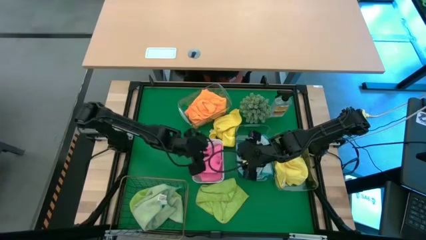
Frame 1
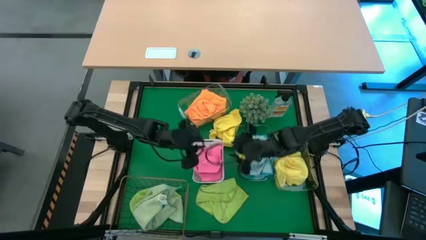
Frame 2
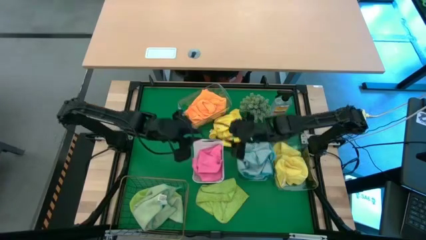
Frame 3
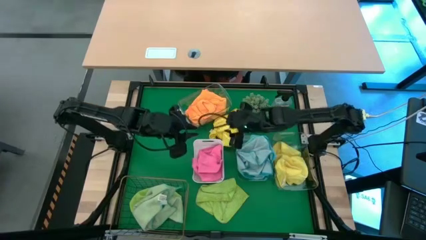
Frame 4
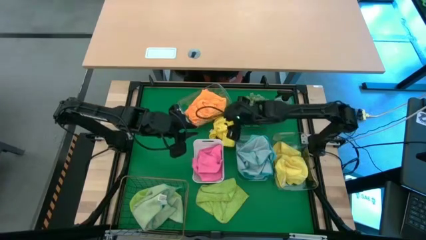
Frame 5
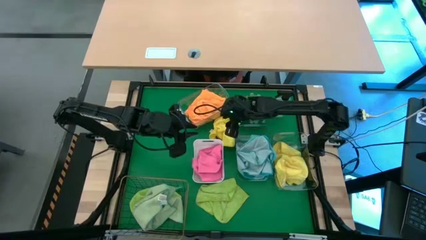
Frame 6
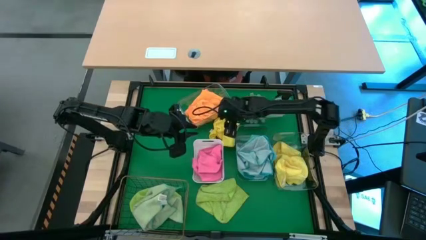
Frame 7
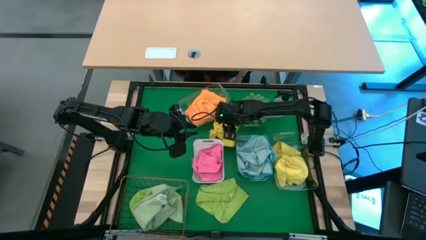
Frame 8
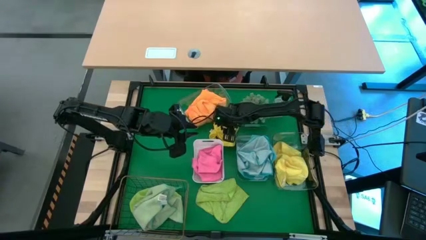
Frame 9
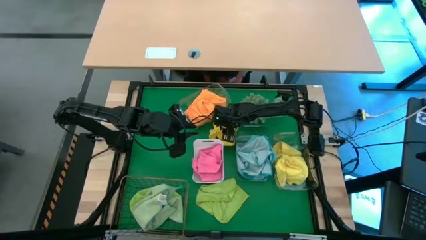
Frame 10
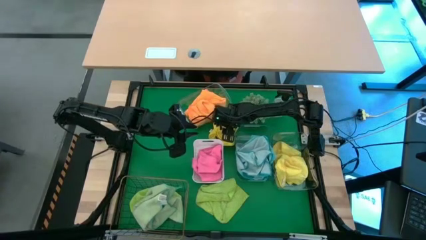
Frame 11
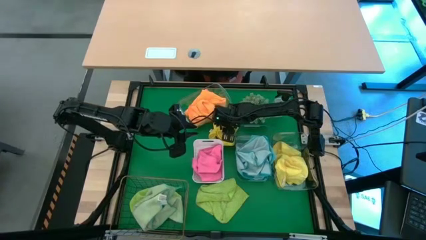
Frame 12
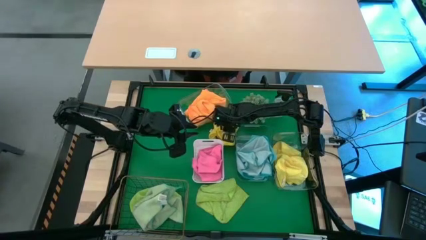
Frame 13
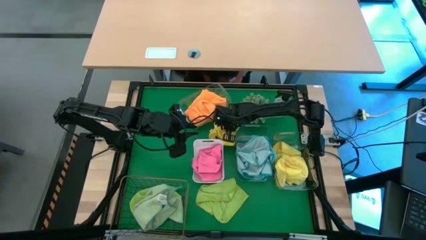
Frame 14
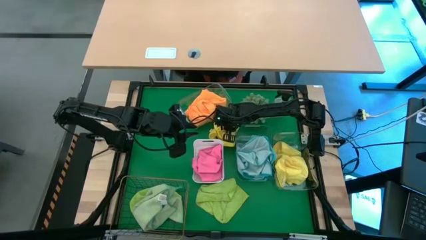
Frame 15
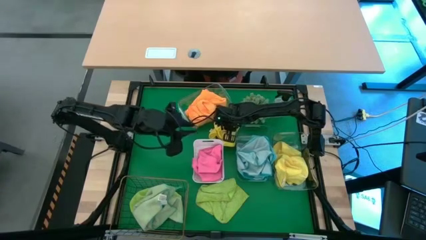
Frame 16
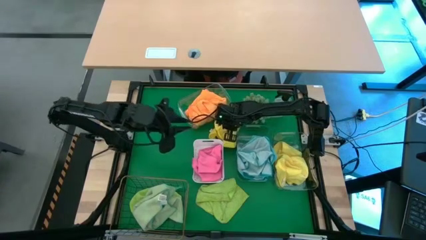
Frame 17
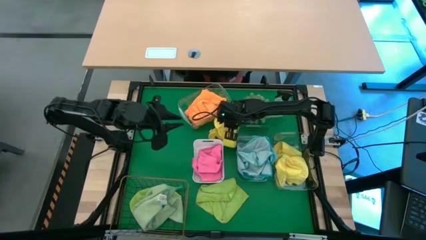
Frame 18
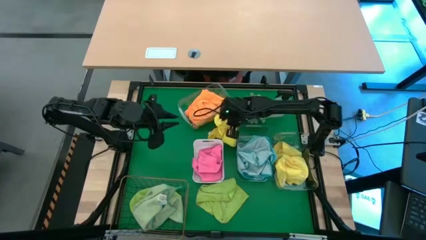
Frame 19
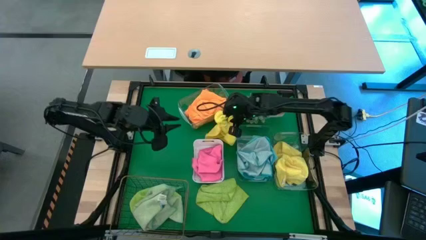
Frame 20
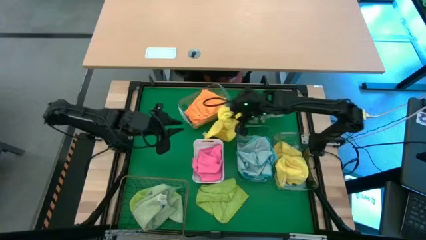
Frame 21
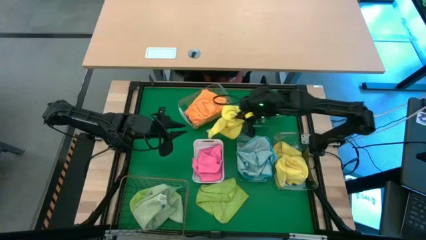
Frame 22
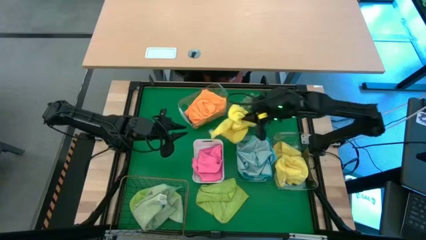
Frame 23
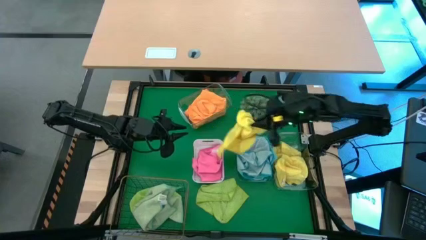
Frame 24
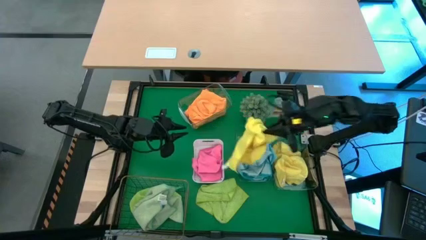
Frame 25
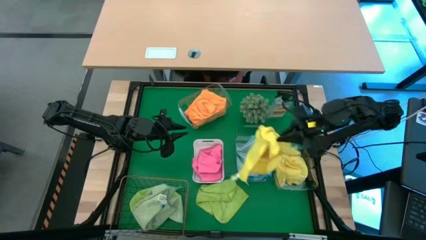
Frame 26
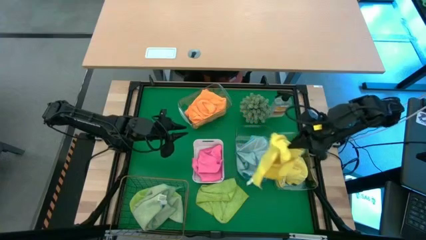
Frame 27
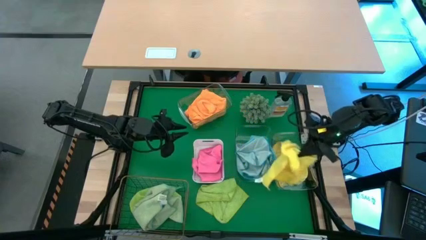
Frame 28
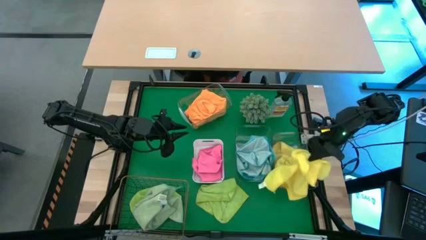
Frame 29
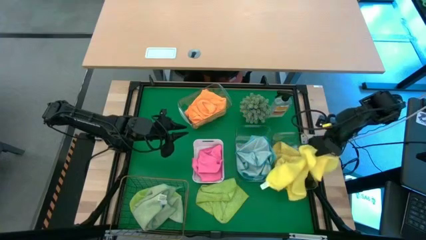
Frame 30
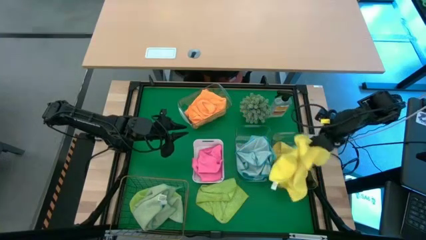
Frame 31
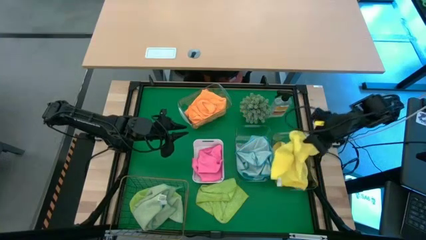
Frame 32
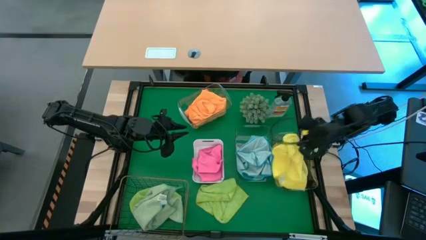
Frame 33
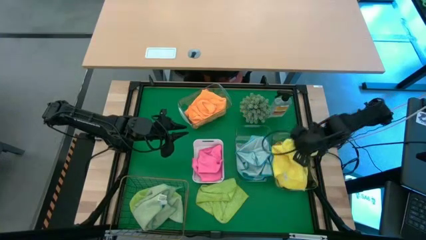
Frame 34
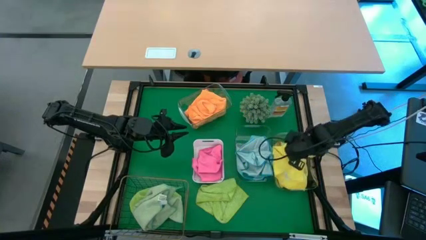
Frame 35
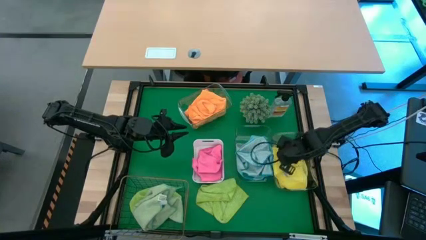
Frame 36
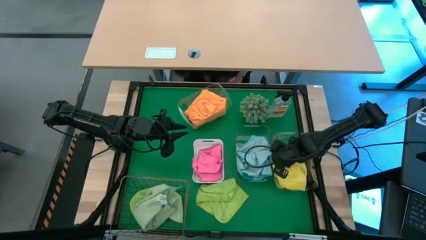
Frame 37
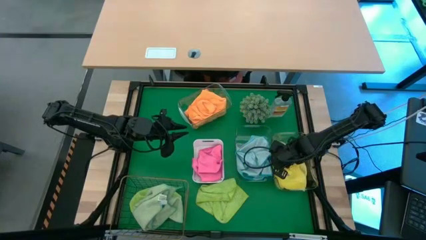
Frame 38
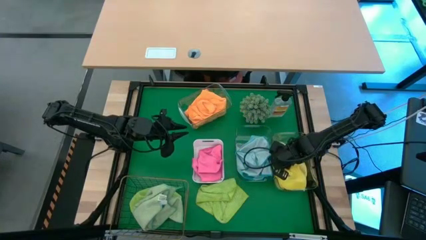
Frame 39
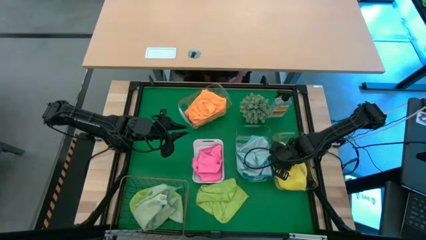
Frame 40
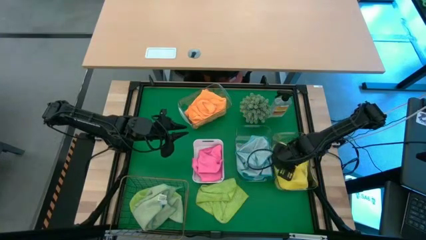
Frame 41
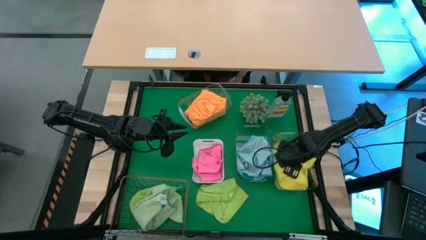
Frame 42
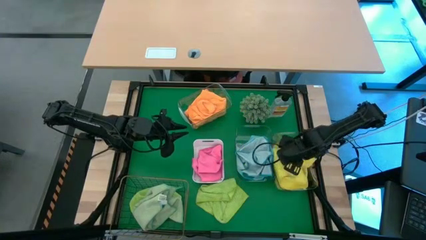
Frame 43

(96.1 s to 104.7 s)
Task: Sort microfiber towel by color & place in baskets
Put the yellow microfiber towel into the right transparent bin

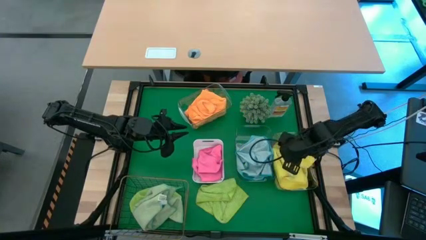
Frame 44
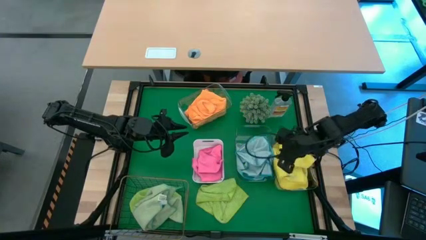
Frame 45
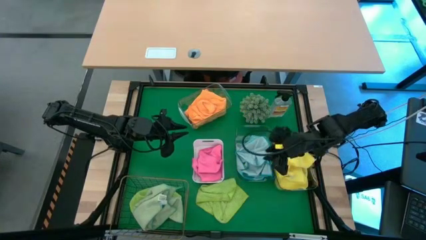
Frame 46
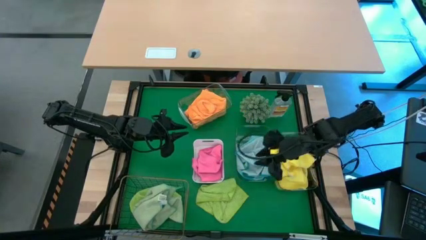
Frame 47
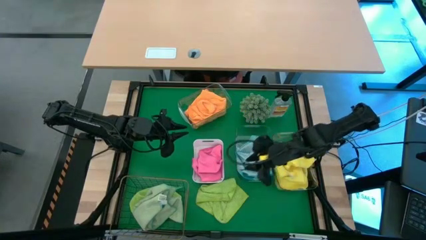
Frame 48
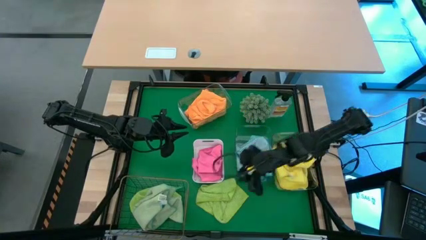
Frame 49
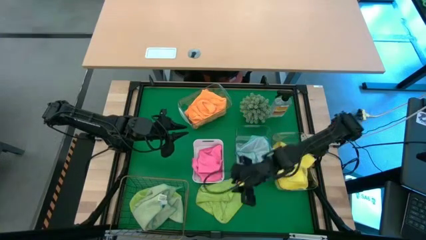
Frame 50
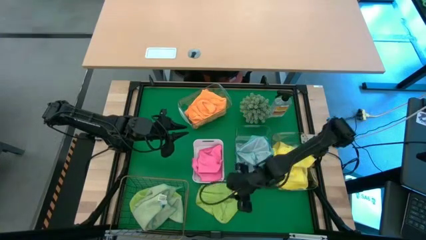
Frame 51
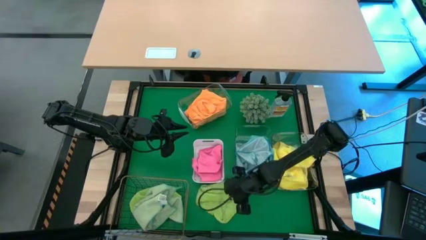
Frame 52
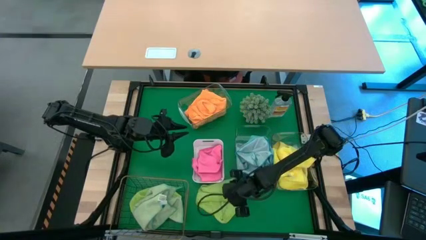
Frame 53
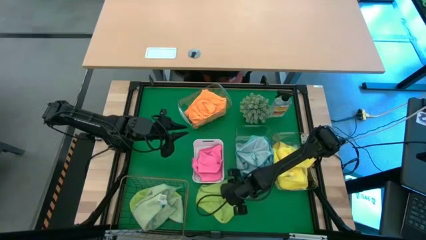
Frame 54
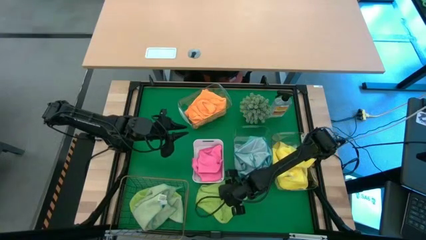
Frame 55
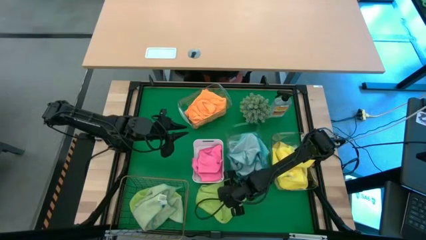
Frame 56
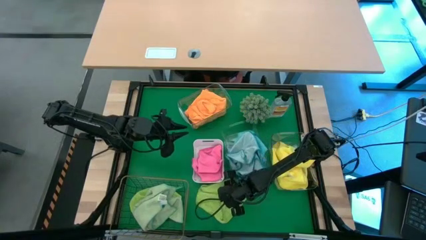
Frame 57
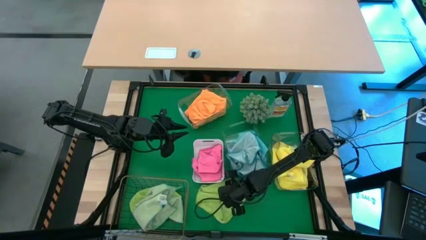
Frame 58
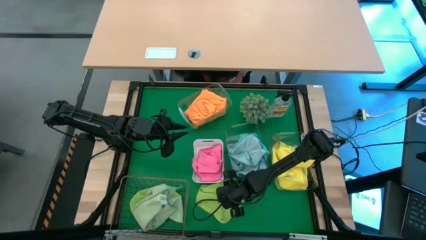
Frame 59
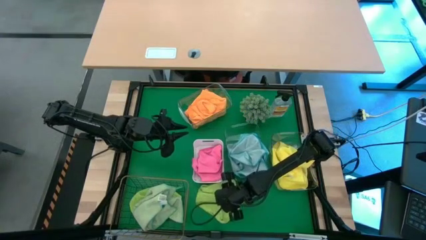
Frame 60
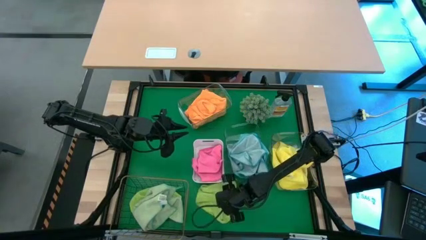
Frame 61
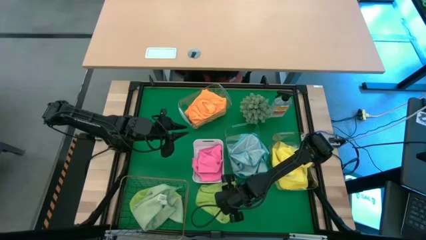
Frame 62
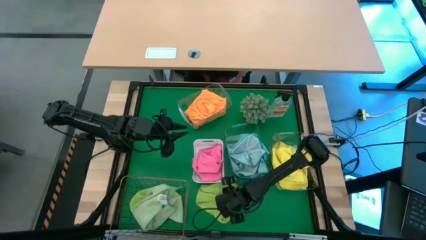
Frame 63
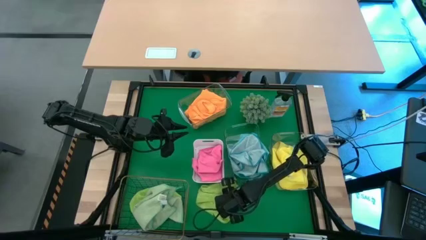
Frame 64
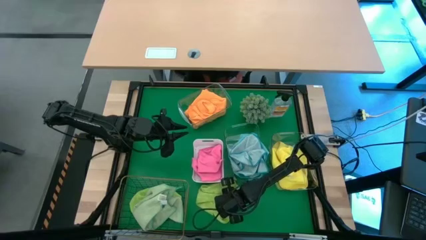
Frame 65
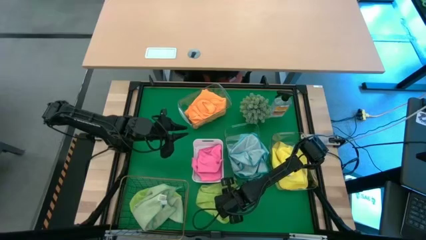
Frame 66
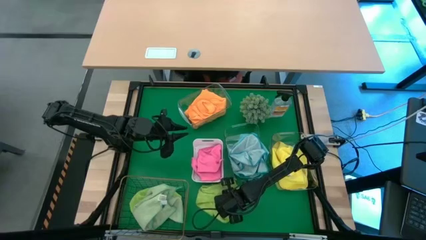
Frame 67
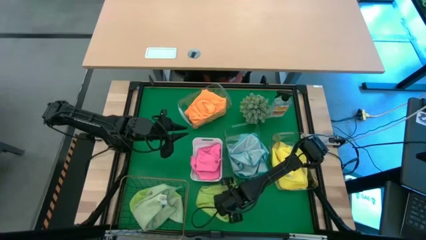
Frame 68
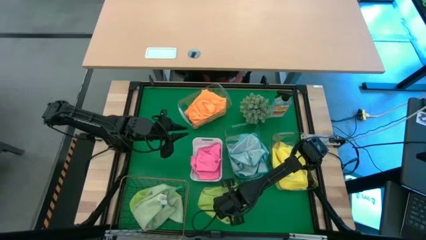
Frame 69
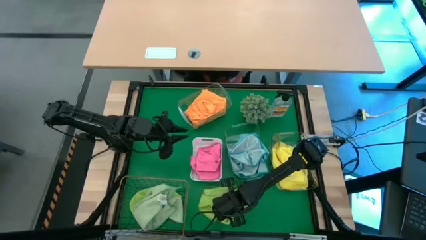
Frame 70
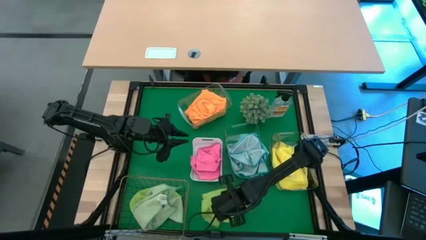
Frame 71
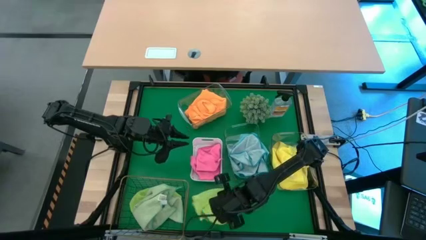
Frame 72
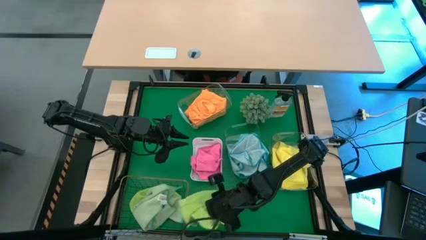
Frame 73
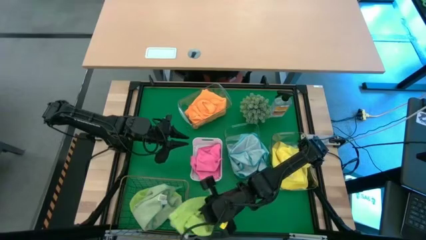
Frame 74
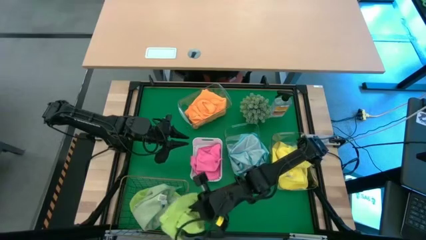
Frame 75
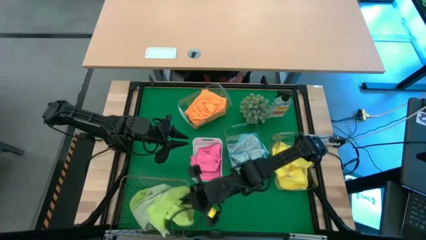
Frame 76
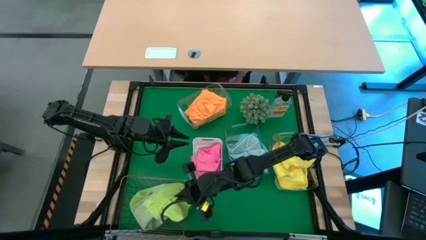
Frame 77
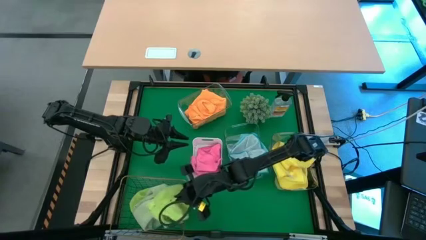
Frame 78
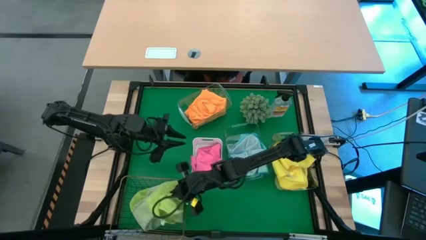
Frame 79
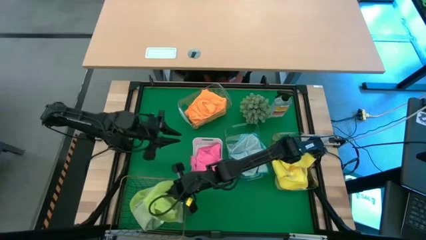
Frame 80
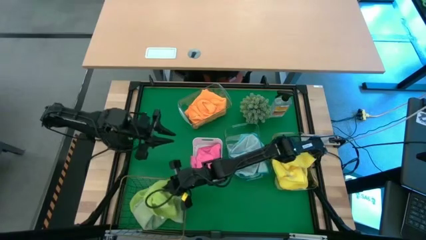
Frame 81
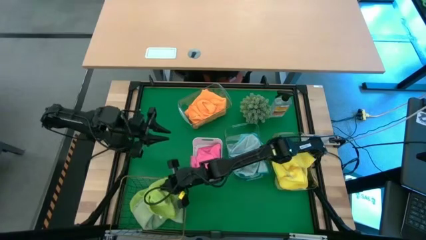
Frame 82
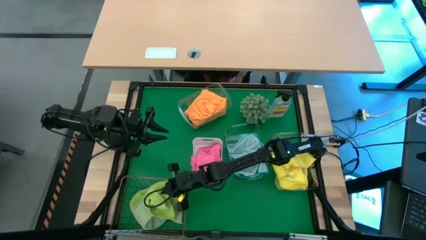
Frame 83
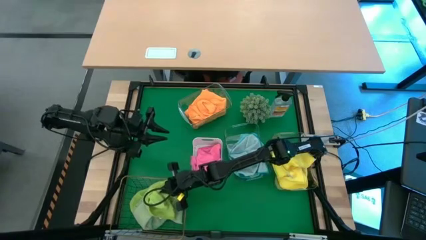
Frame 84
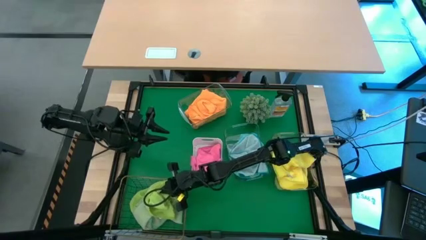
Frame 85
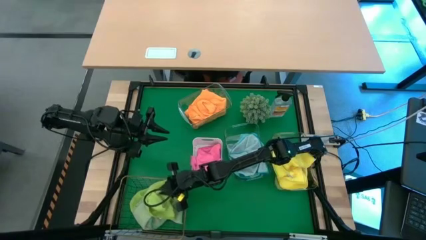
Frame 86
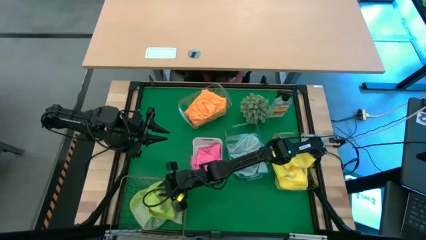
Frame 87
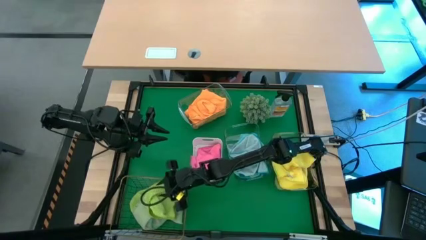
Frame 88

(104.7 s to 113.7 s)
Put the green microfiber towel into the gold wire basket
